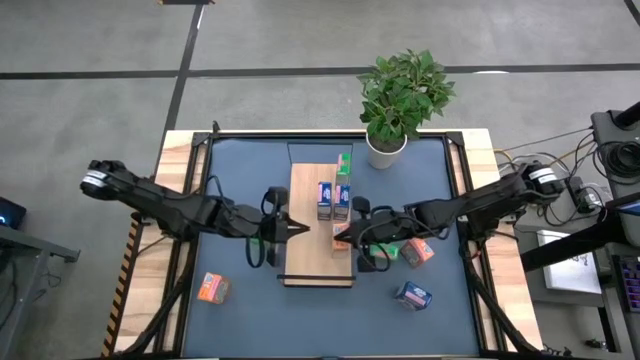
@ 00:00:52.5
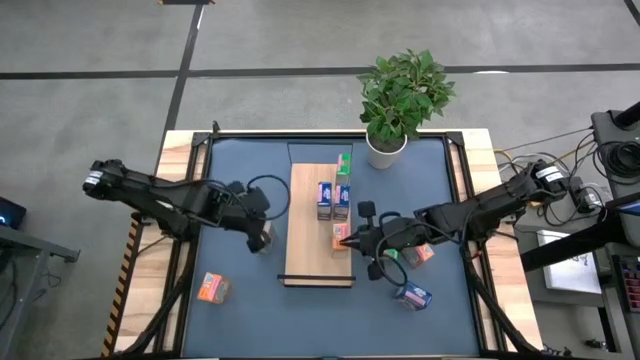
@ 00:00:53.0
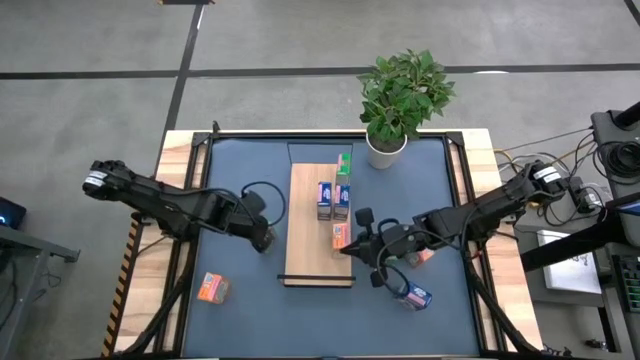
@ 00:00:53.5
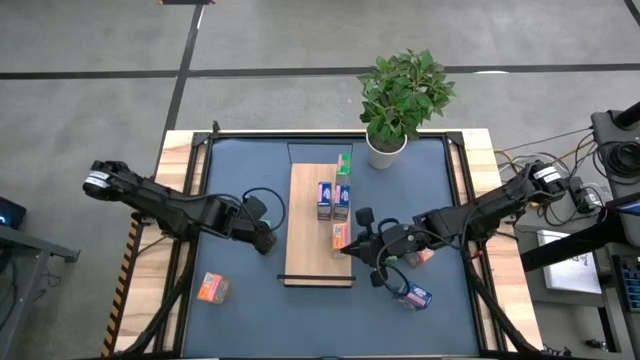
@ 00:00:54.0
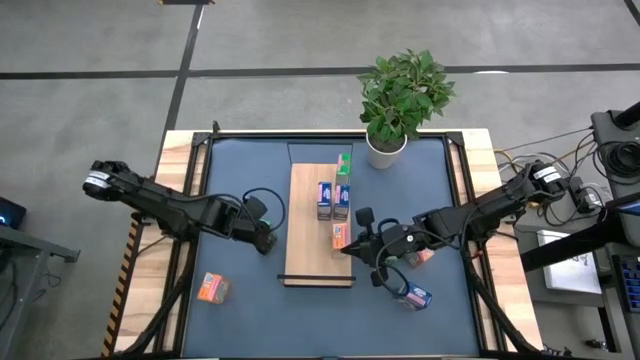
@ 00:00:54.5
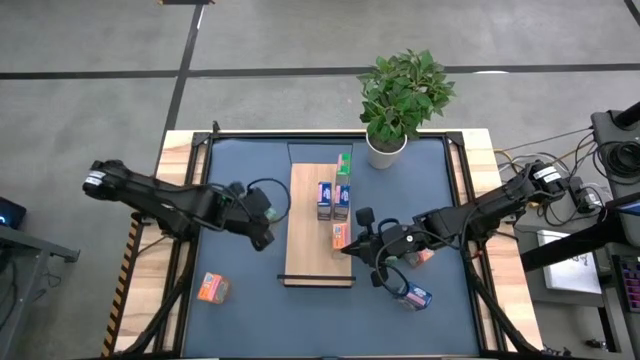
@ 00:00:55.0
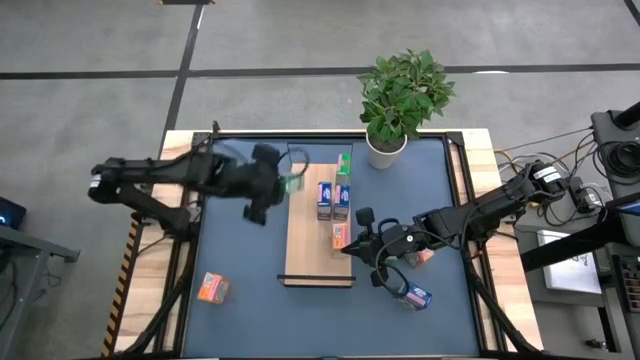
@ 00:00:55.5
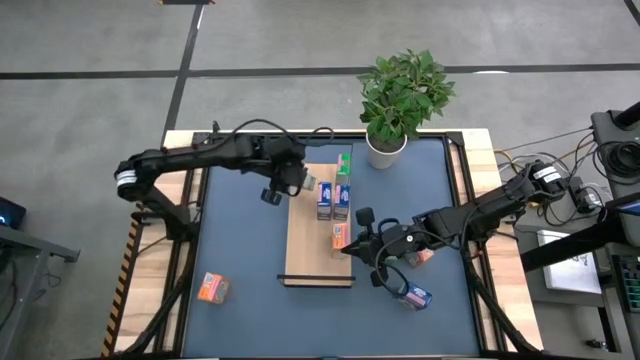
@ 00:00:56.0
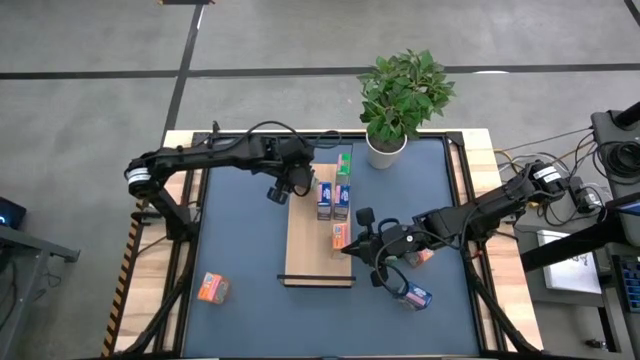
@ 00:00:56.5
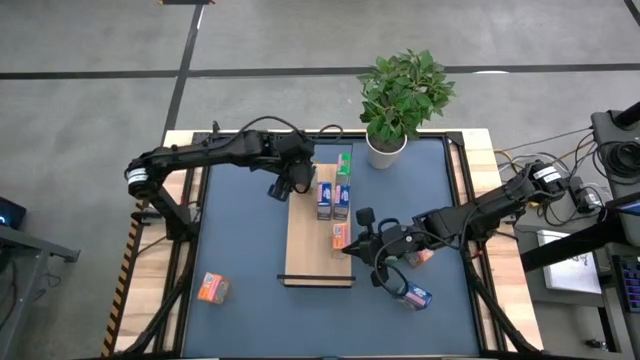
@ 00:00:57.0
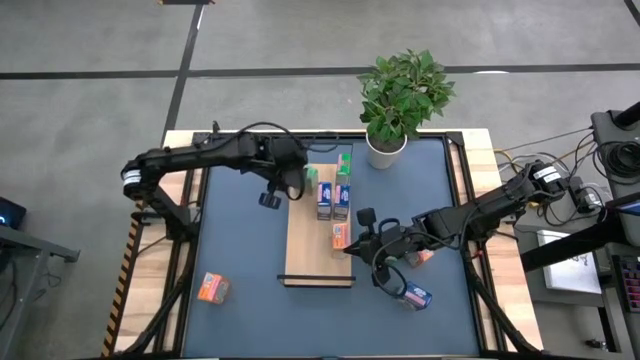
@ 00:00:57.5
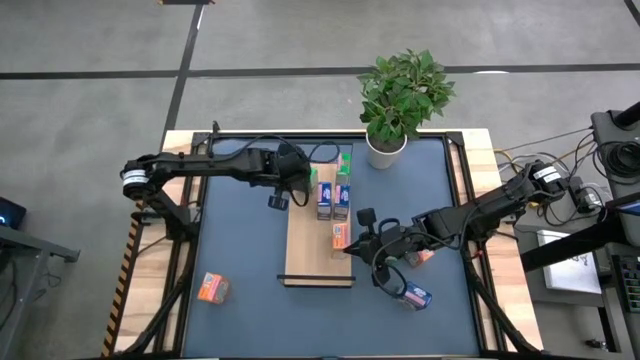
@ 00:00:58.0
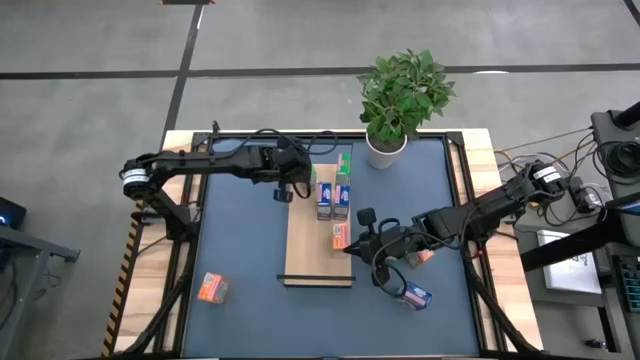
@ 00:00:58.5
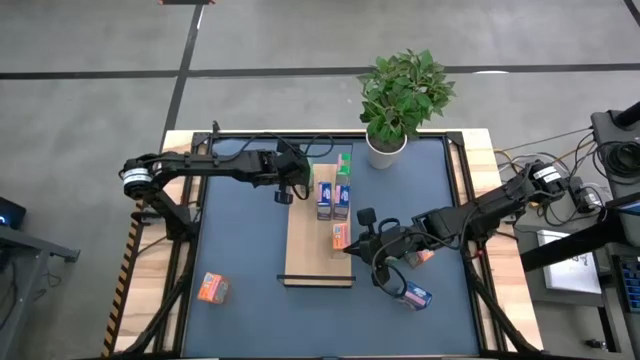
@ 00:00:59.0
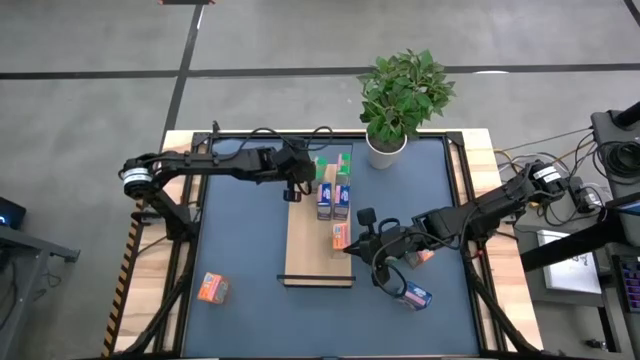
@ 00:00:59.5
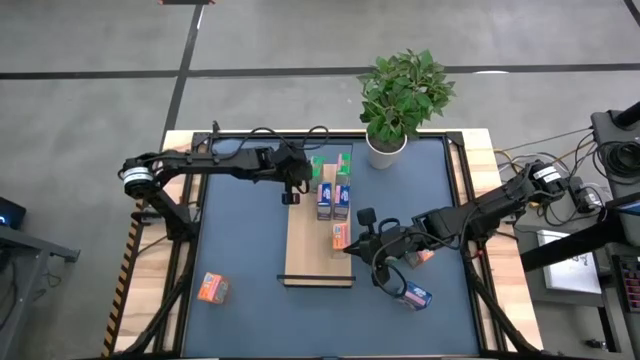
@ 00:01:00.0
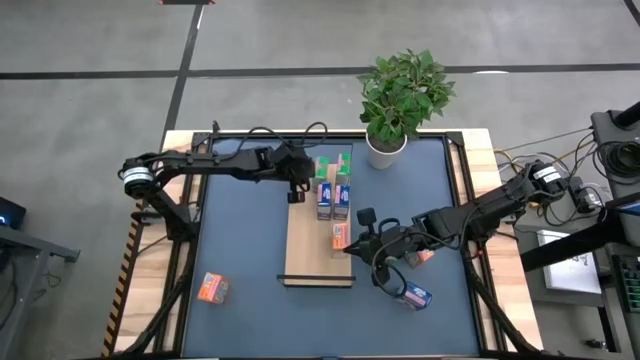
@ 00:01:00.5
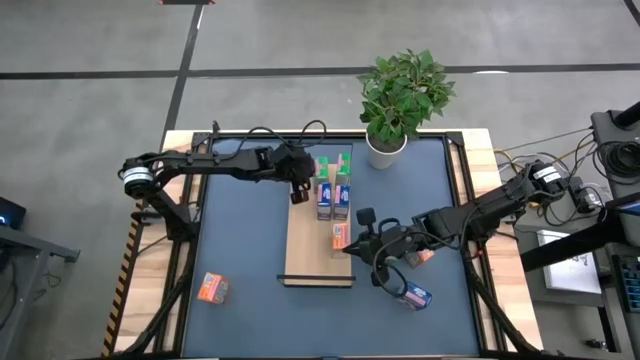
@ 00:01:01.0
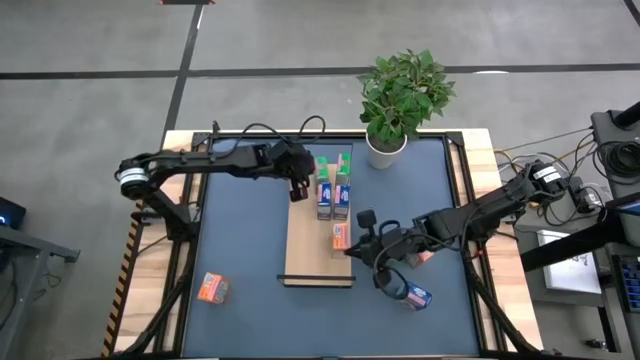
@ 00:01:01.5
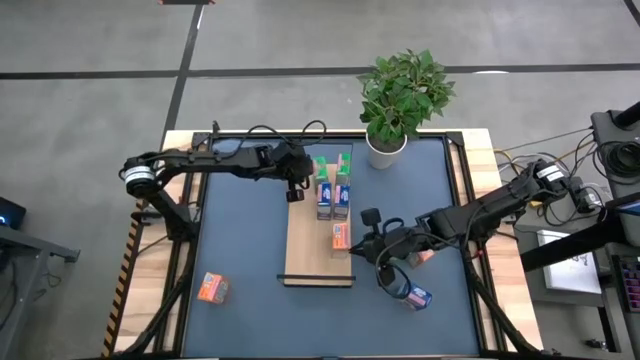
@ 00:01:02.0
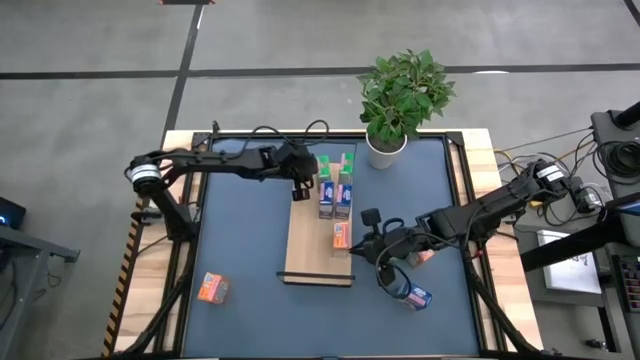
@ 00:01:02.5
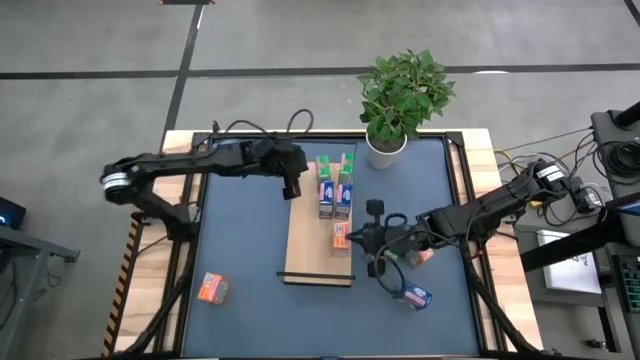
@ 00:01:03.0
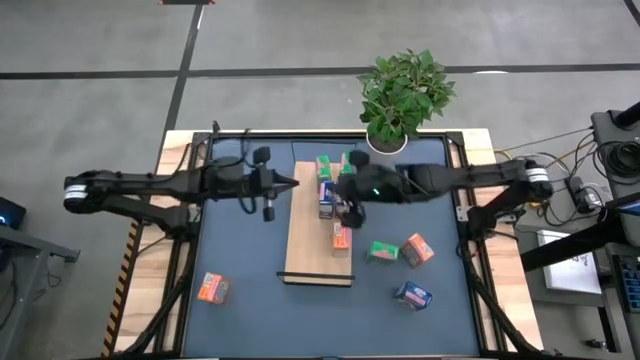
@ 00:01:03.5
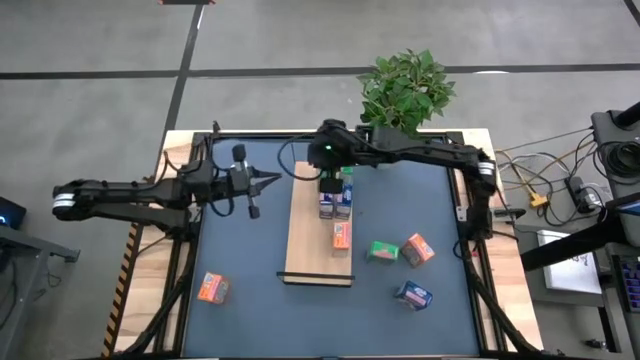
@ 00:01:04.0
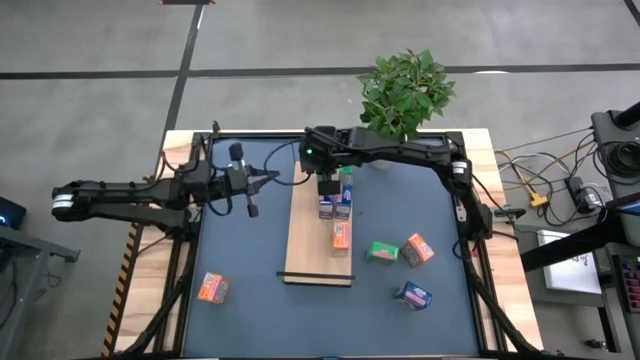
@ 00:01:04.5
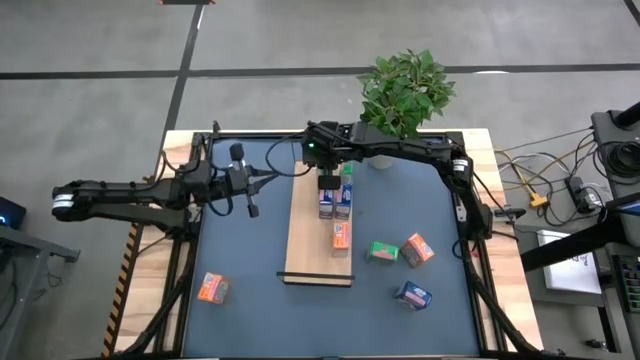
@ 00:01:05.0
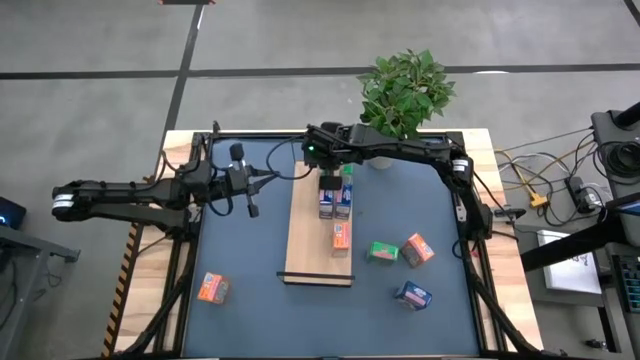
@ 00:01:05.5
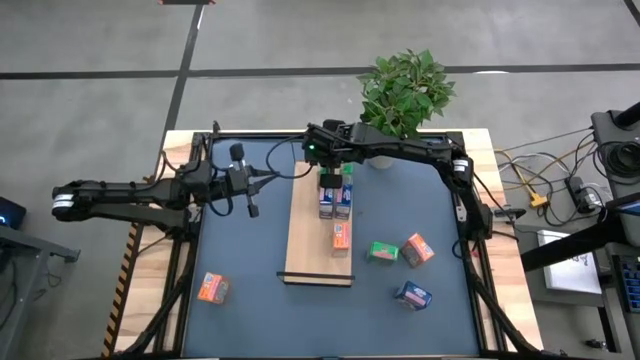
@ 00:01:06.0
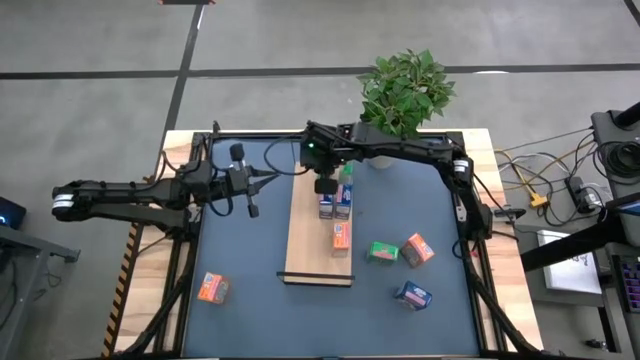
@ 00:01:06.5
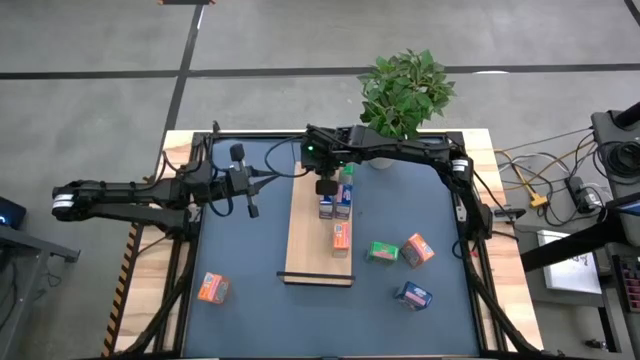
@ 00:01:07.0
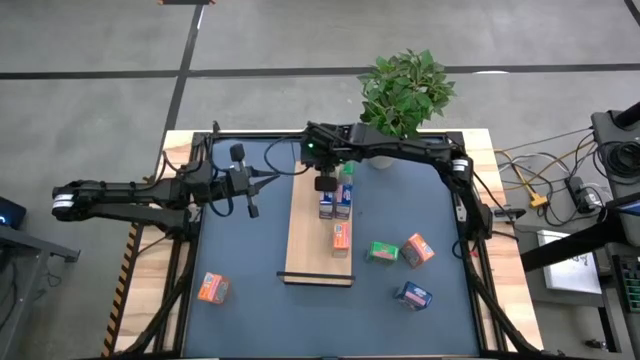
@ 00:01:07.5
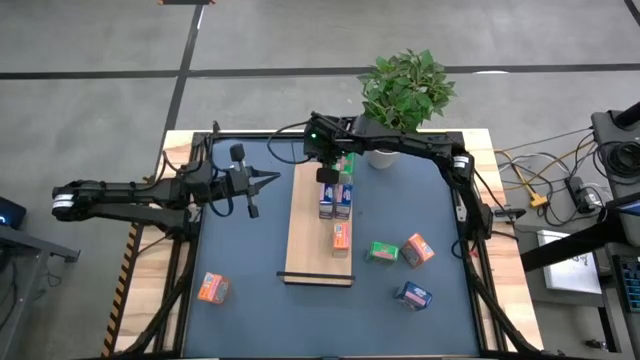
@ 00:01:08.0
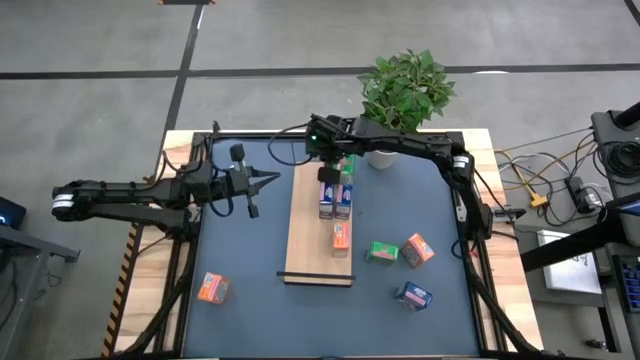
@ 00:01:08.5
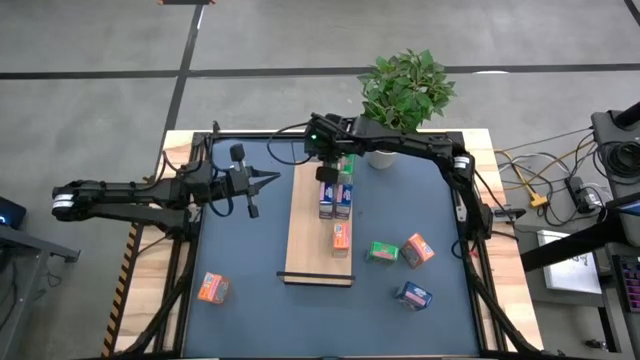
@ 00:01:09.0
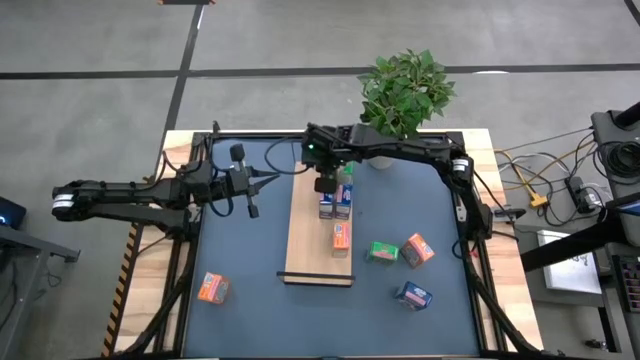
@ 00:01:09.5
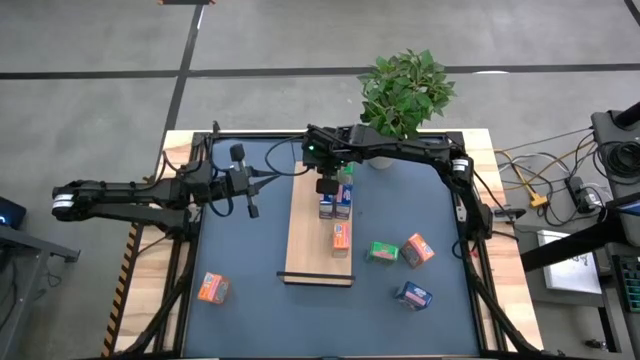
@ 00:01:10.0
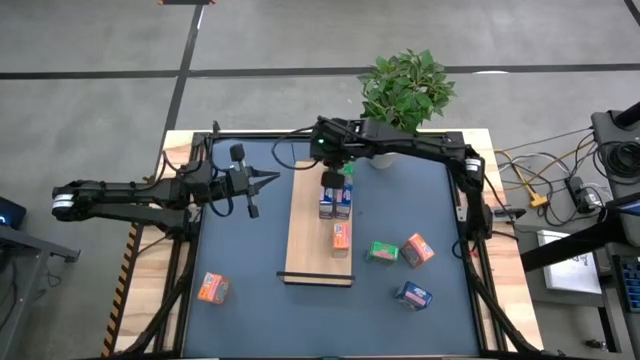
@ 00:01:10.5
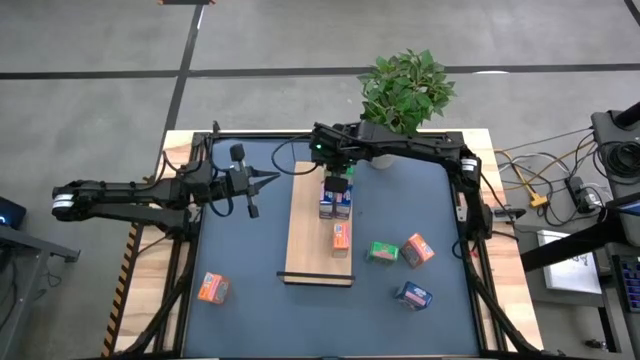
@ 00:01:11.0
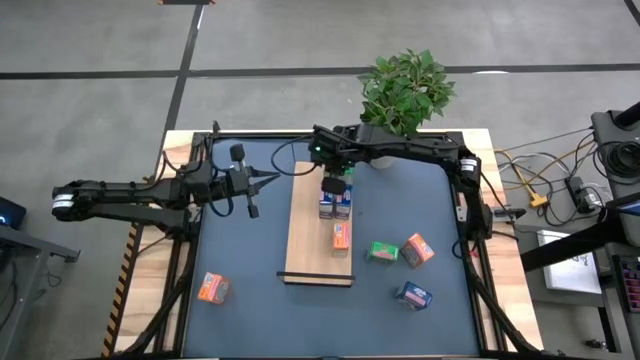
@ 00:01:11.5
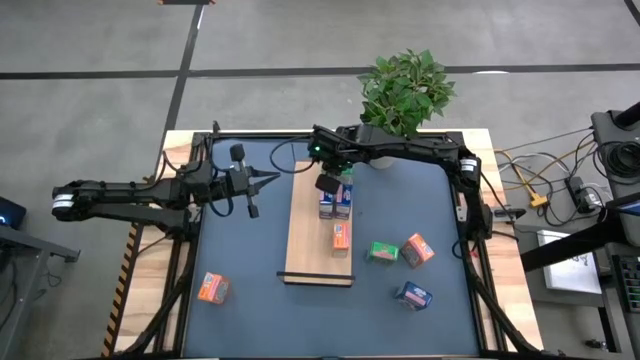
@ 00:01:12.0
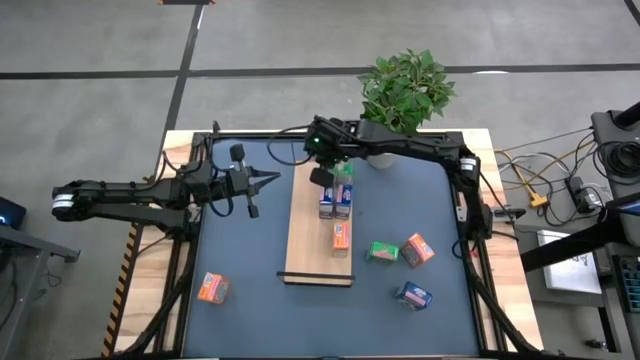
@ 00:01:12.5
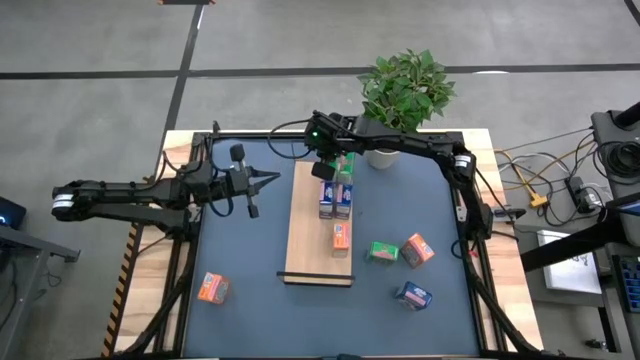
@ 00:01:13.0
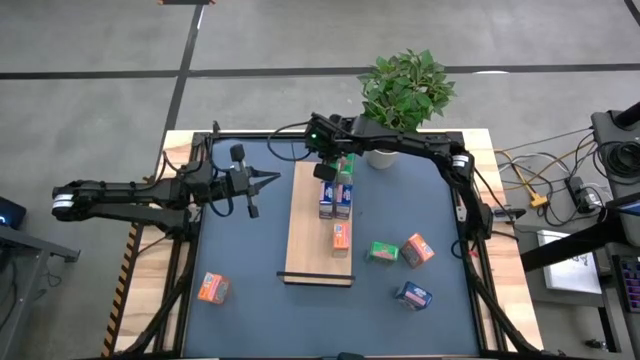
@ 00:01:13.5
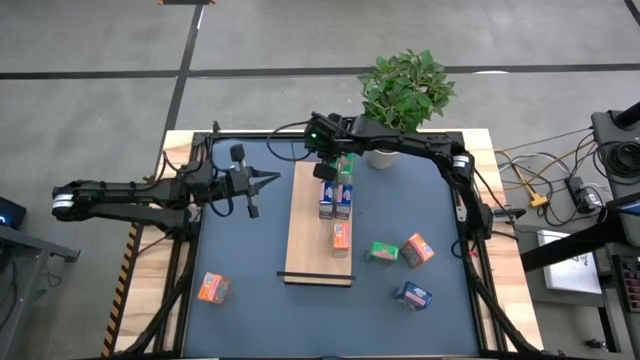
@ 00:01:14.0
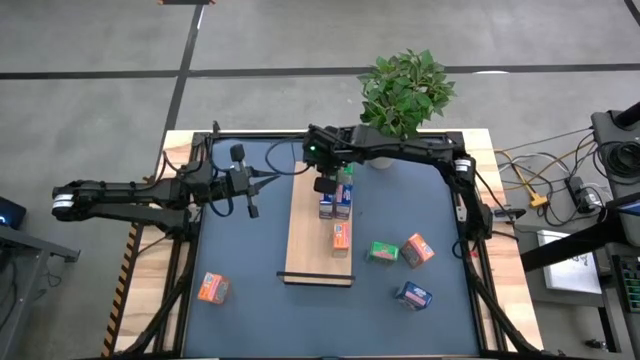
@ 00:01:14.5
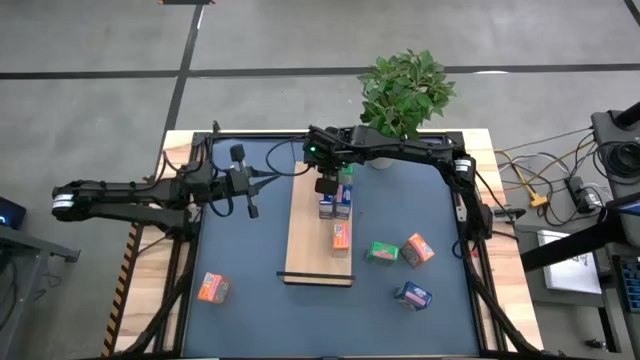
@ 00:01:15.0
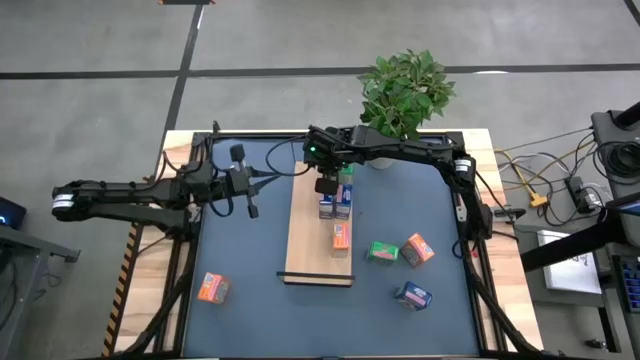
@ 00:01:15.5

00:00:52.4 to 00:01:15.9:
Task: Stack cereal on shelf
Put the left green cereal box on the shelf aligned with the other green cereal box
